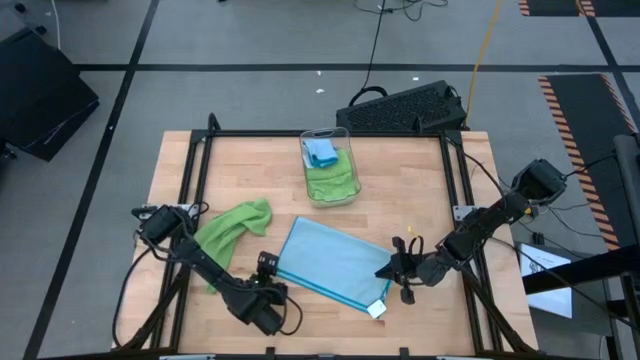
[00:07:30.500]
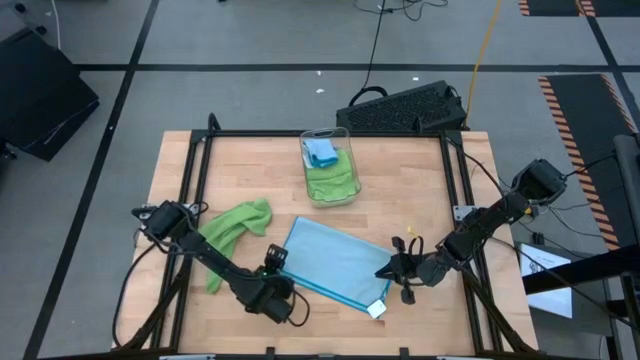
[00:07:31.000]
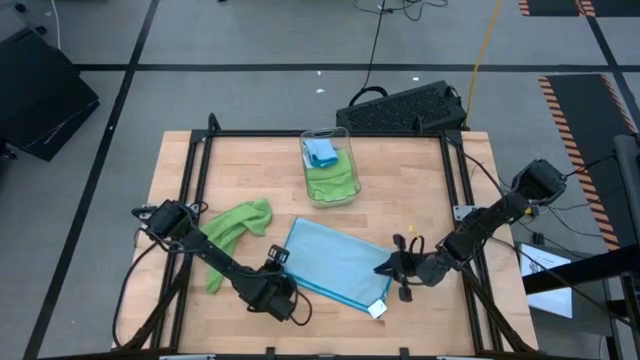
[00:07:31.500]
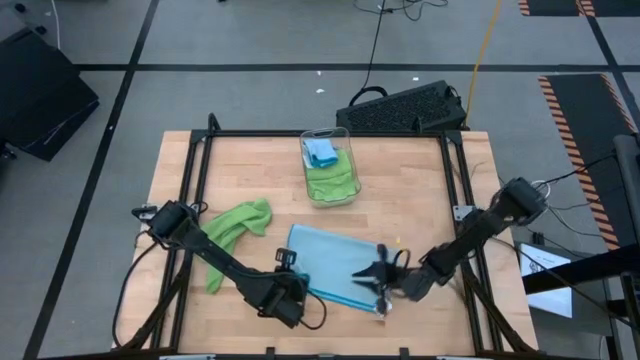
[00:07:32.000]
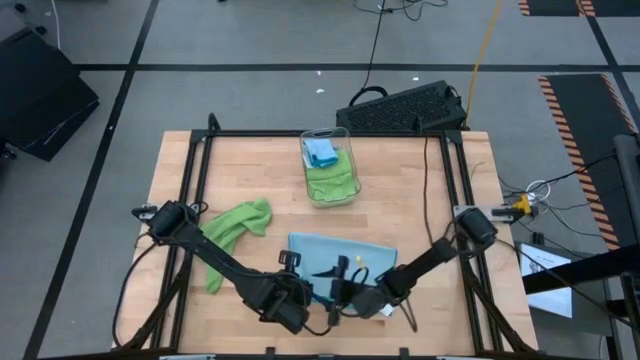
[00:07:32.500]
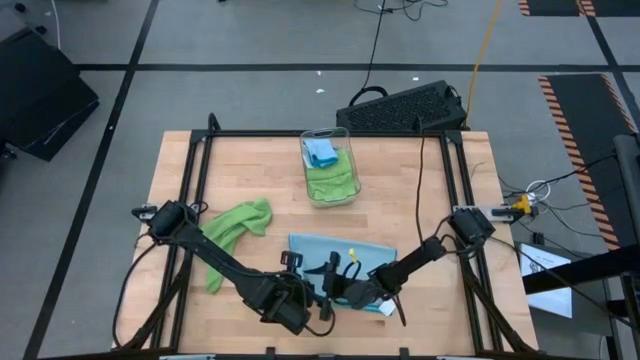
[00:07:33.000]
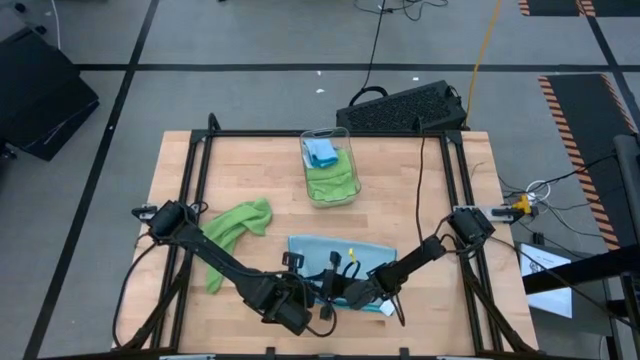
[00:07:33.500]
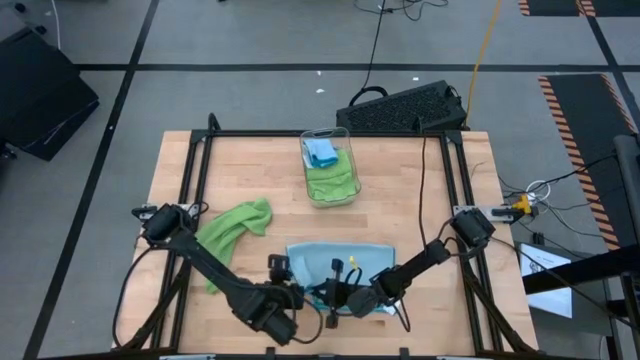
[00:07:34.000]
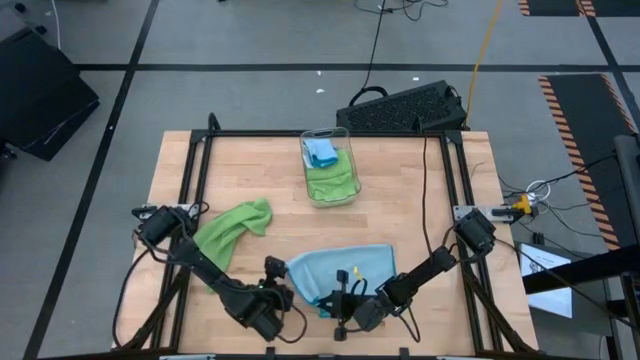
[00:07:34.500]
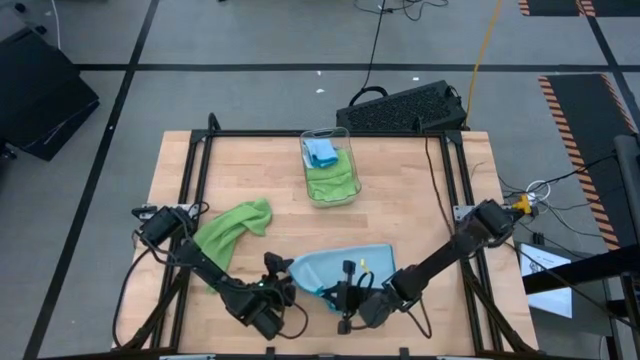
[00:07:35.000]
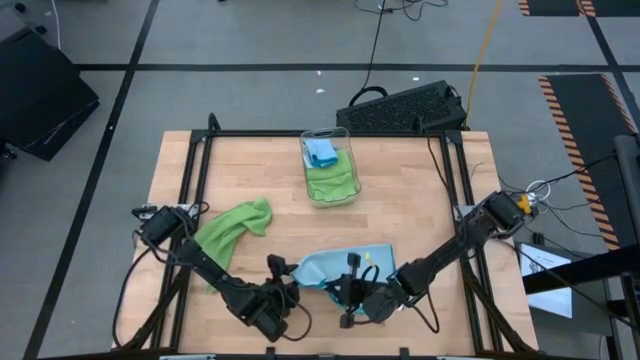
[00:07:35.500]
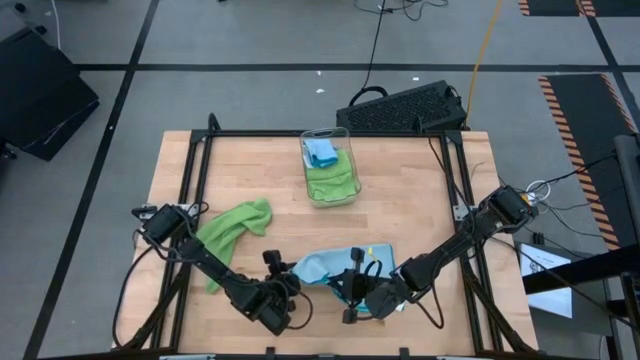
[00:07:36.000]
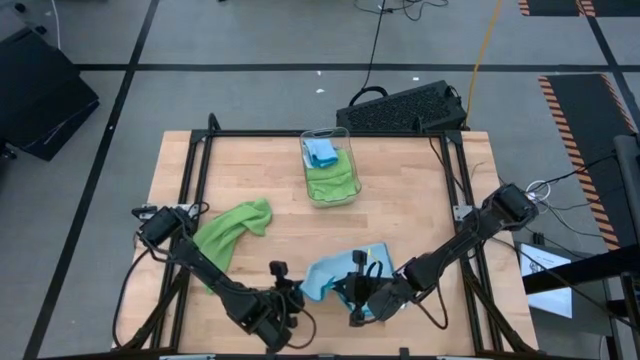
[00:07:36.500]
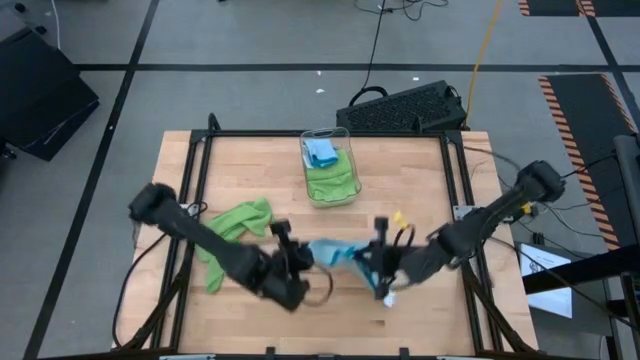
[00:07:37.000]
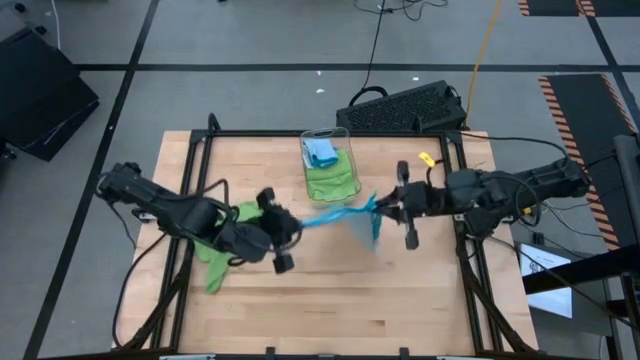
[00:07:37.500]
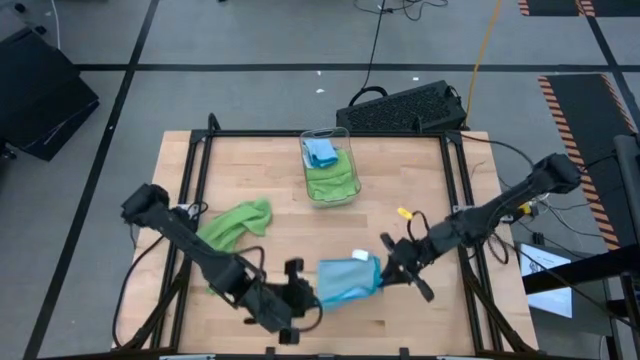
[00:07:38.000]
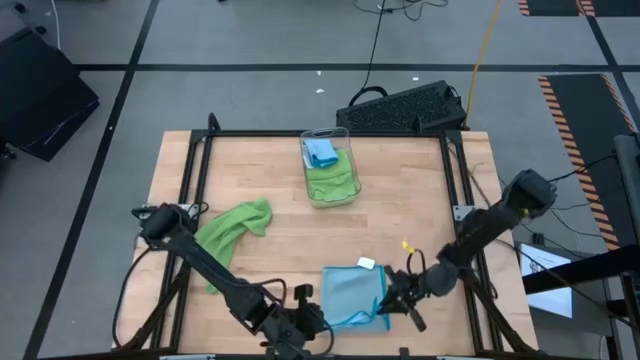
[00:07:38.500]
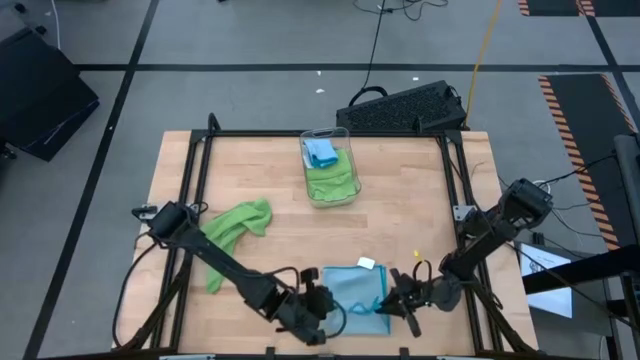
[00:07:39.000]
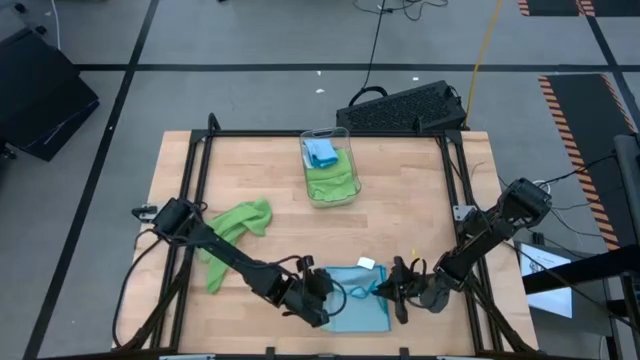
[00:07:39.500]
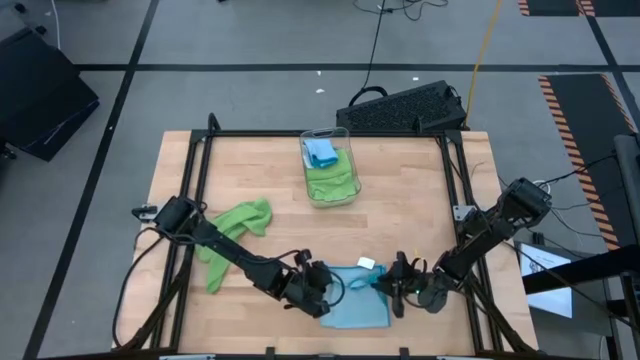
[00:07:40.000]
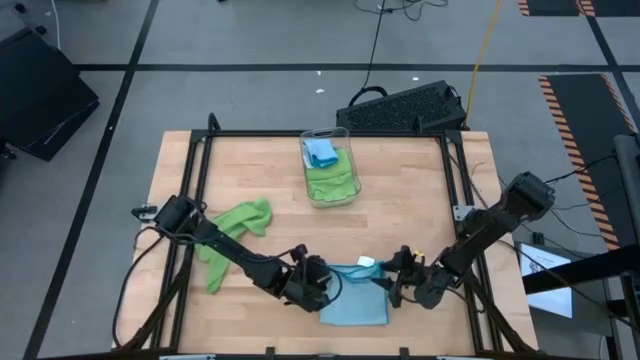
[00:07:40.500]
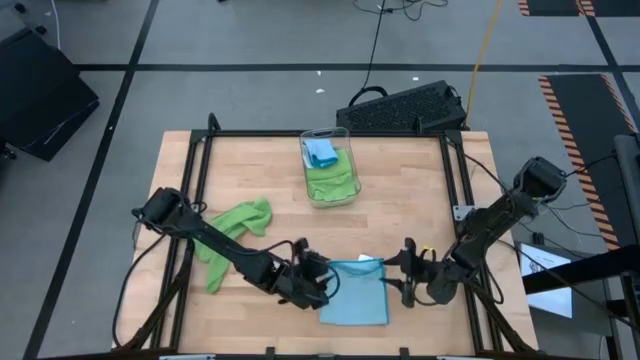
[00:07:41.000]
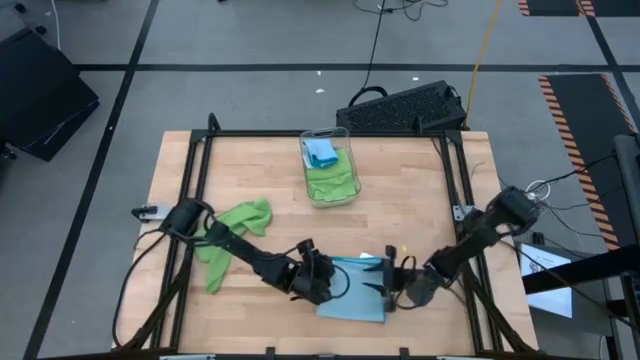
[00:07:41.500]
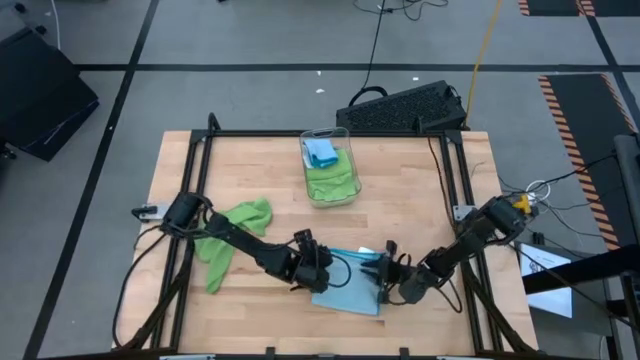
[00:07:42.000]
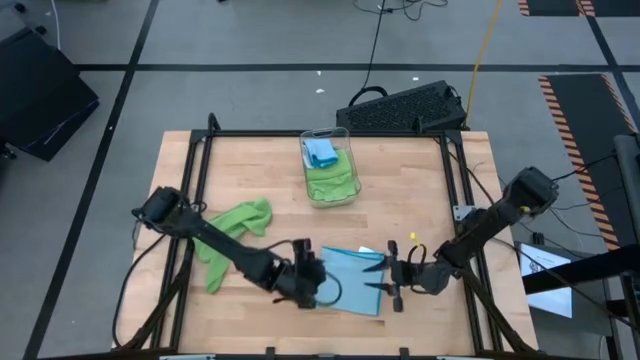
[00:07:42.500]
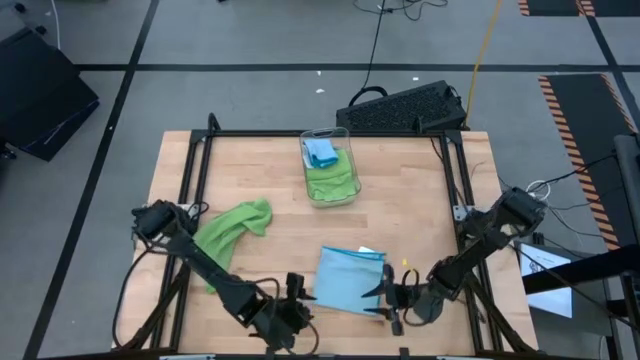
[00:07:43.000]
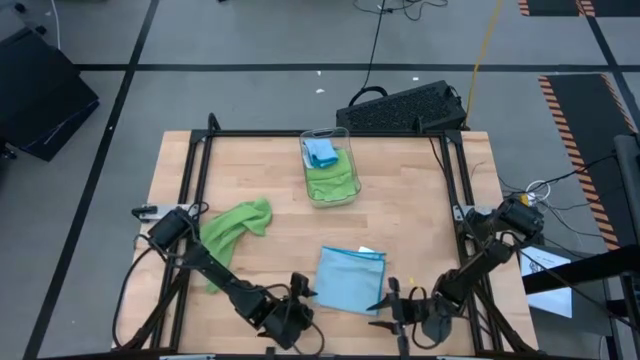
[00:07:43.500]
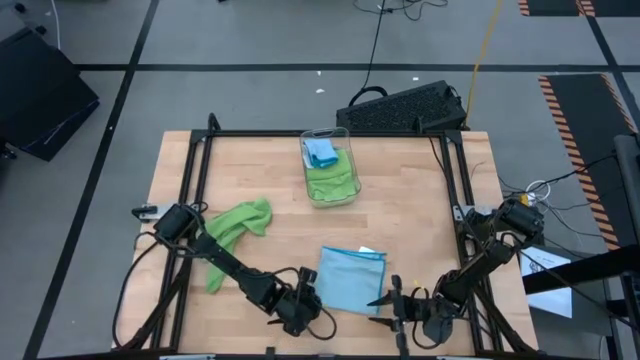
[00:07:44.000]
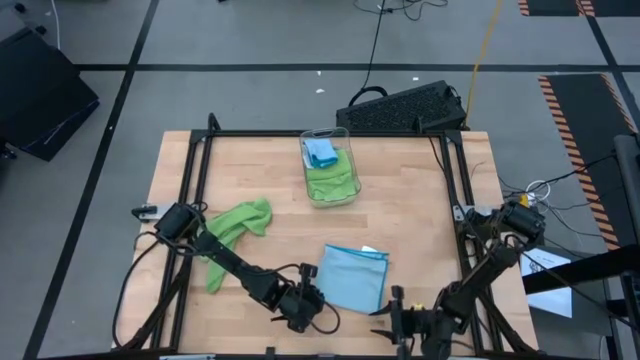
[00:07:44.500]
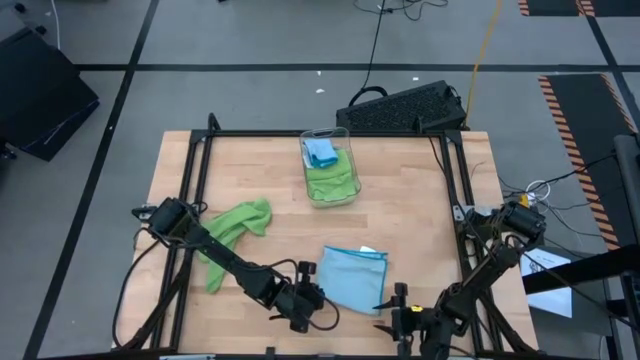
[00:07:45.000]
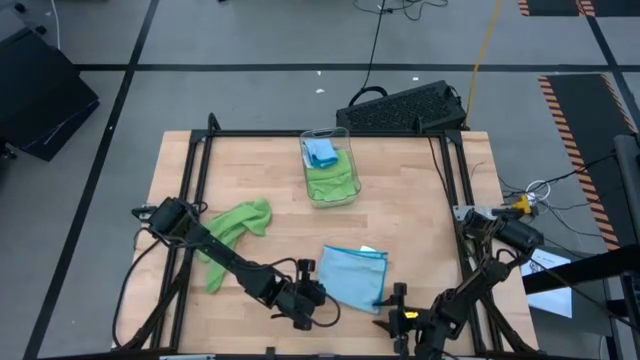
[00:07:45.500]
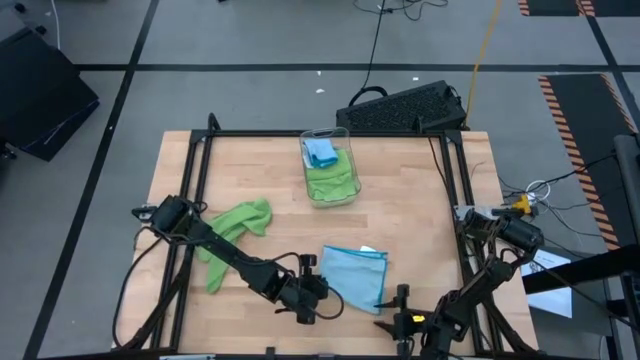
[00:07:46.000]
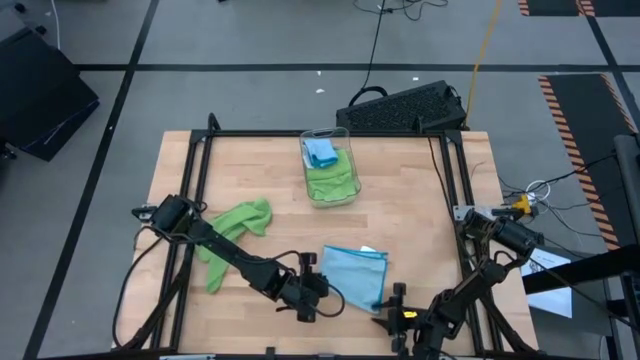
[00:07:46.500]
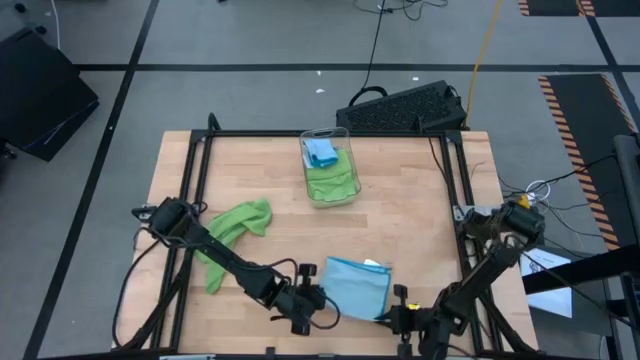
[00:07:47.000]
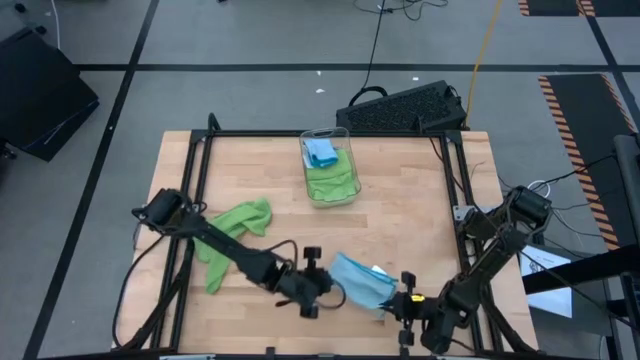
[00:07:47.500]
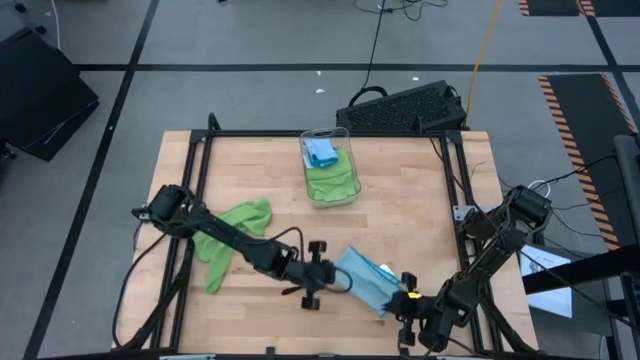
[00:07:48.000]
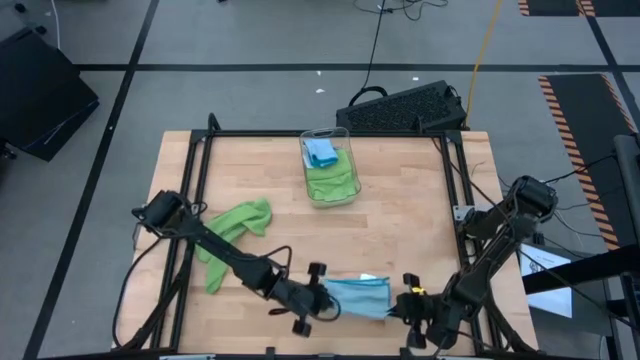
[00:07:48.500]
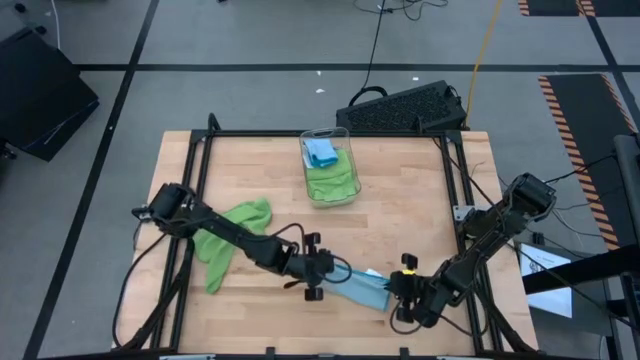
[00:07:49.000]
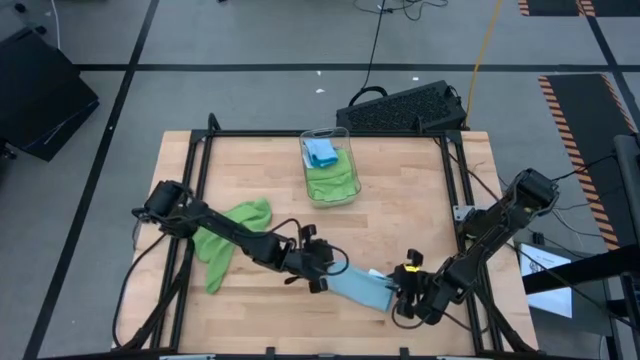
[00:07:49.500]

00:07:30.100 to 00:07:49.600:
Task: Fold microfiber towels
Fold the blue towel
